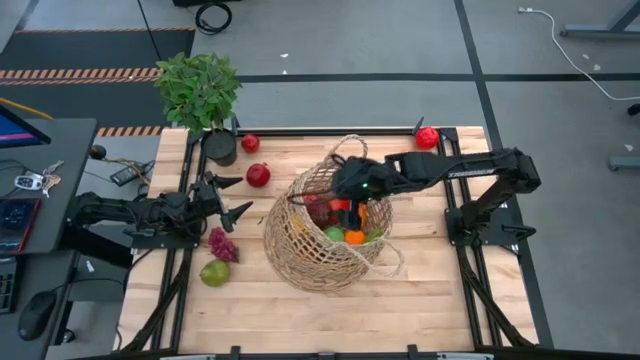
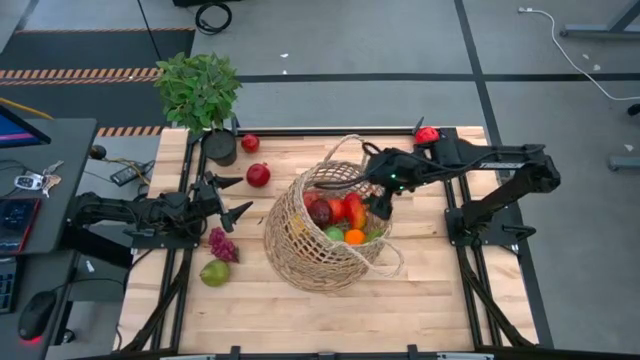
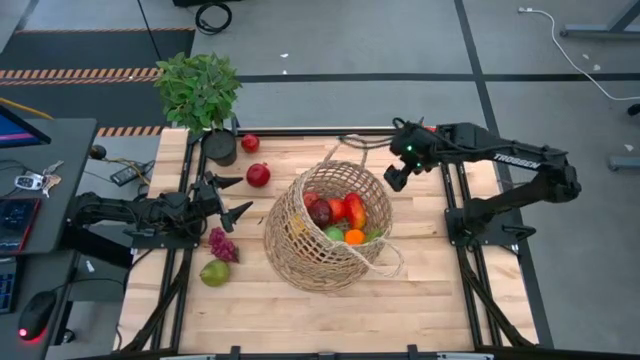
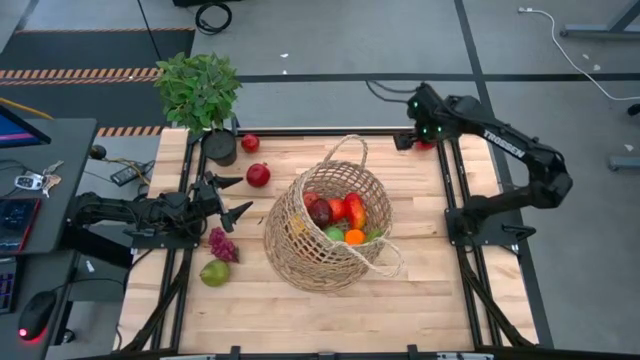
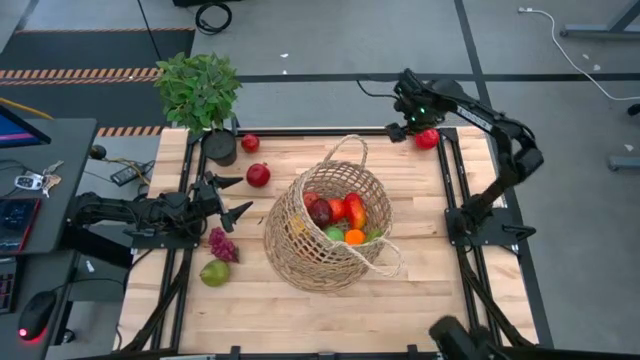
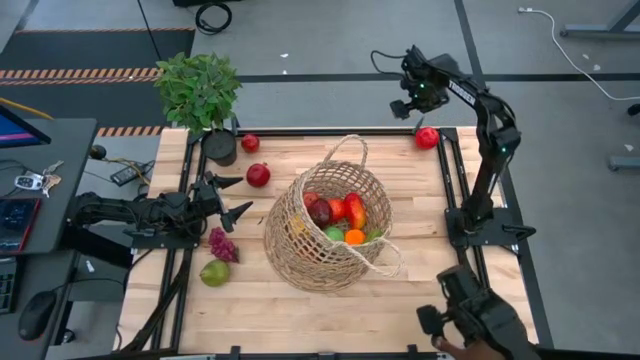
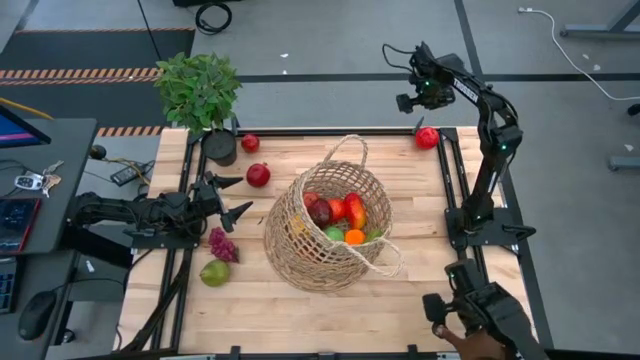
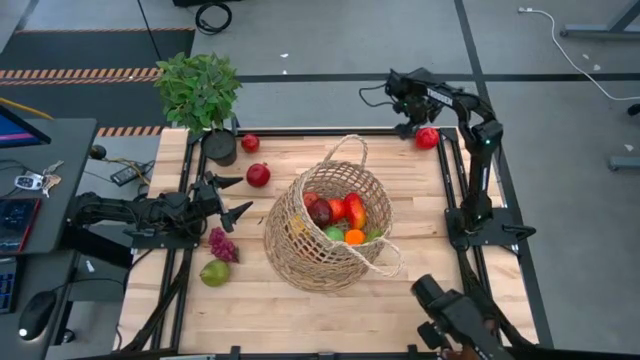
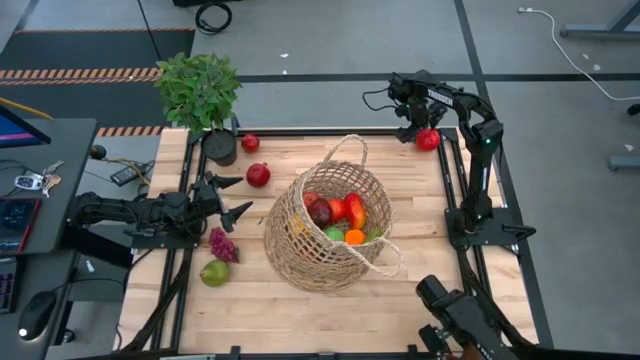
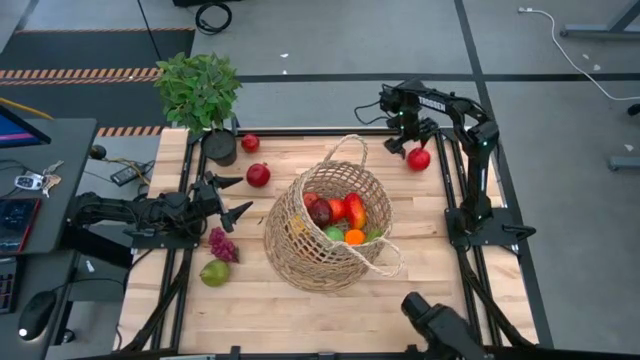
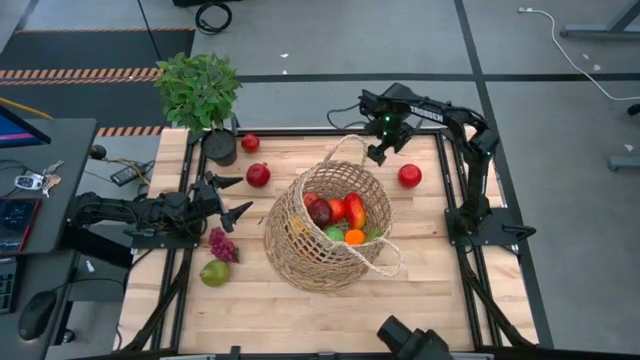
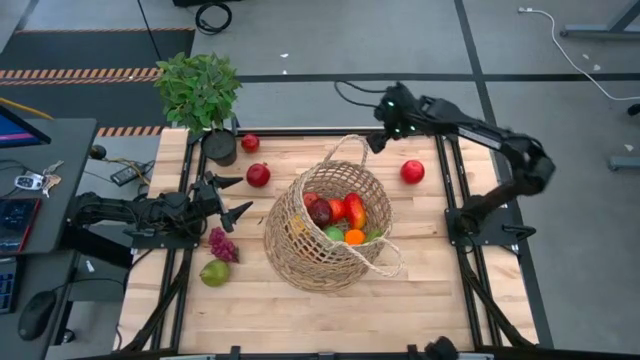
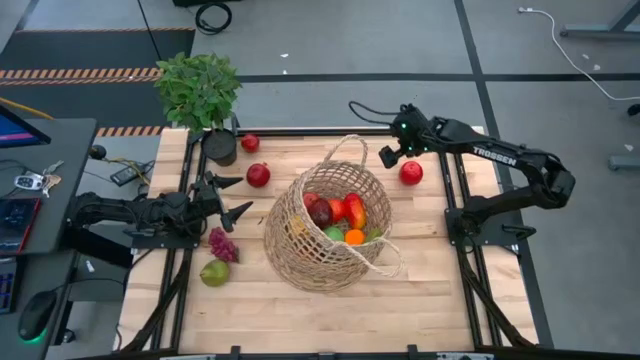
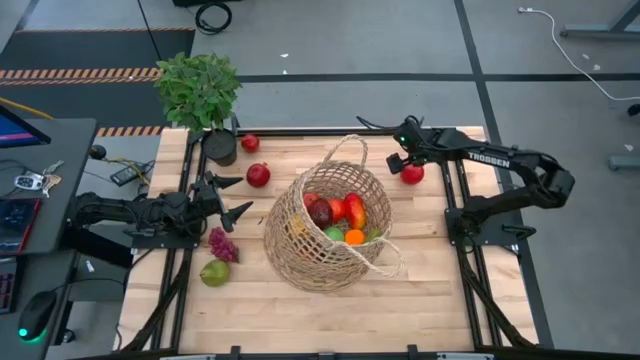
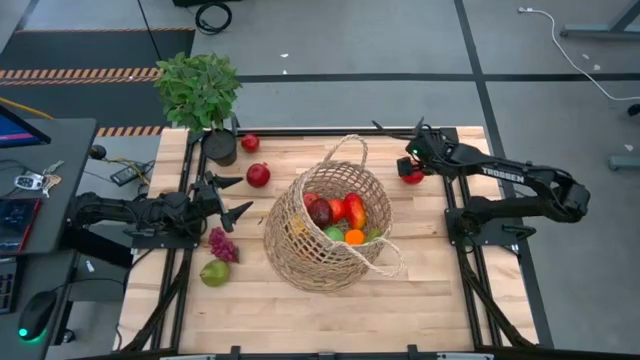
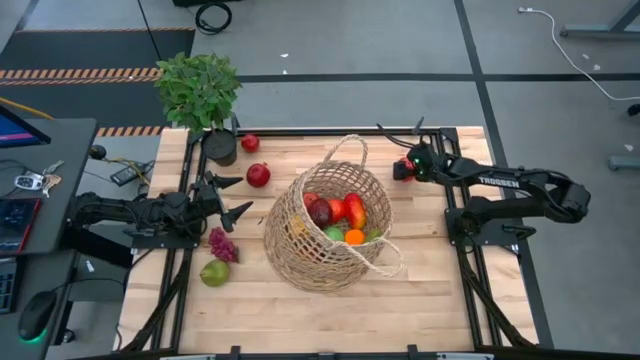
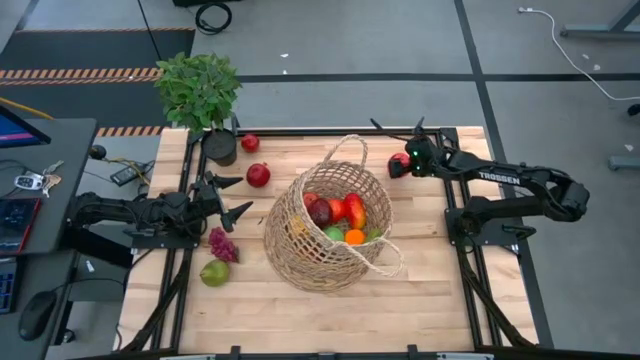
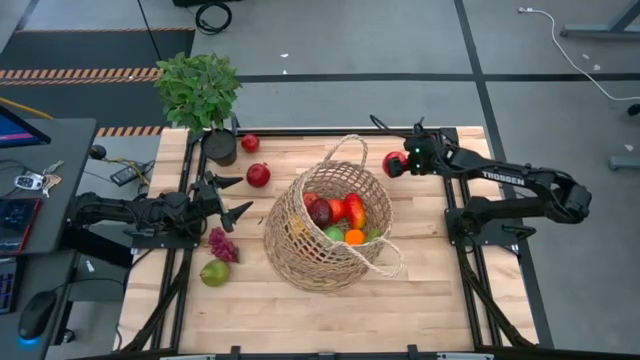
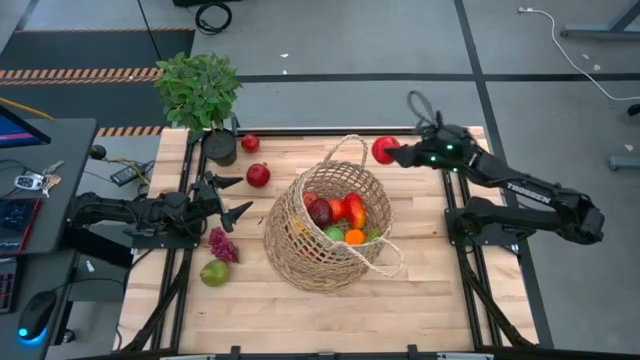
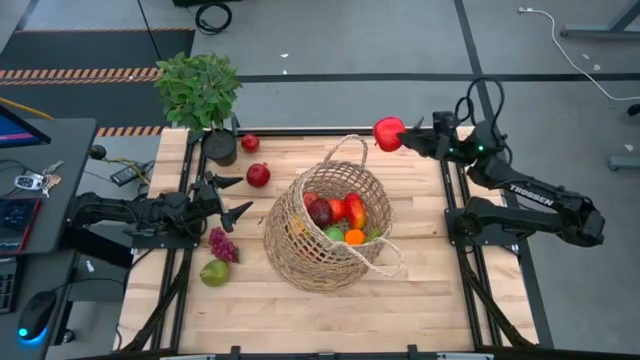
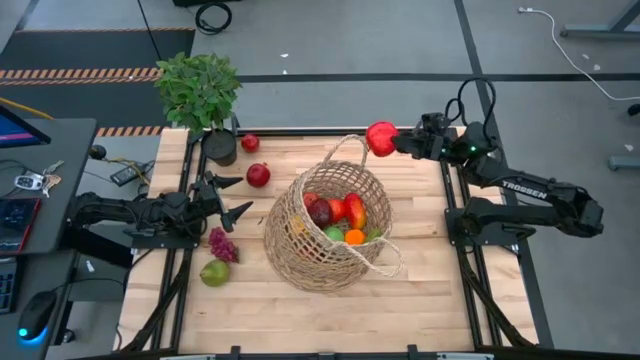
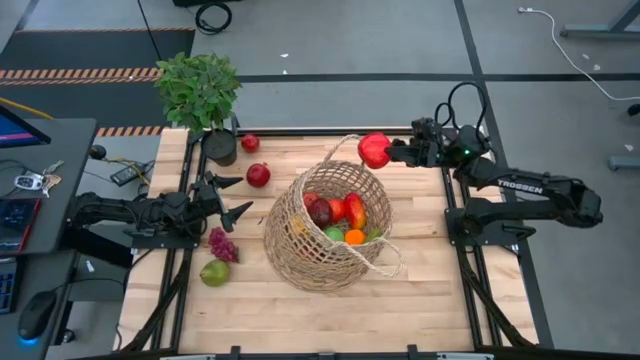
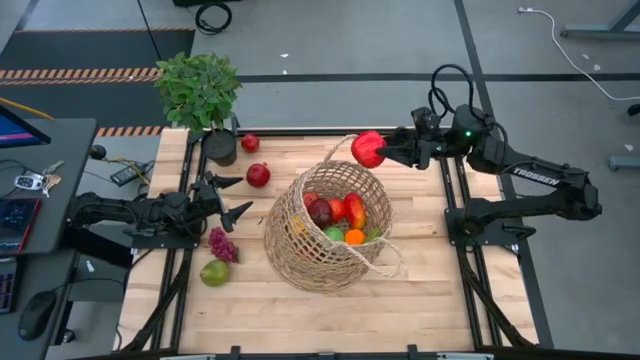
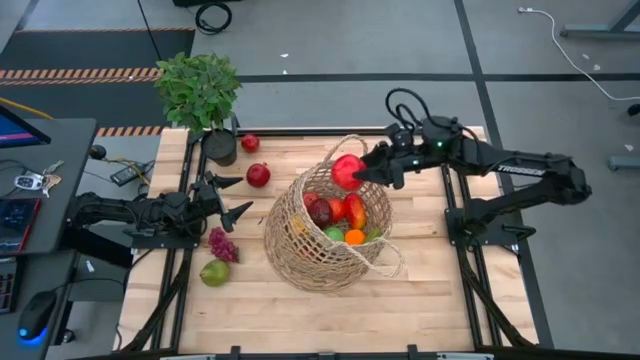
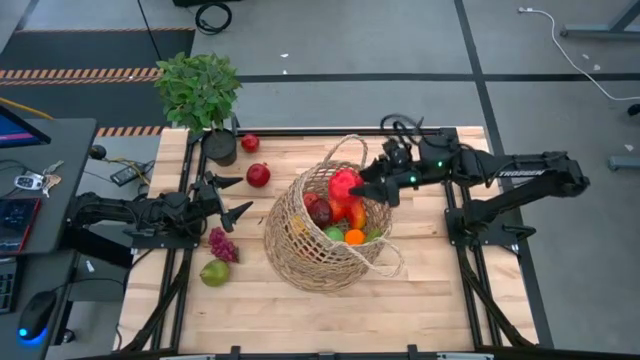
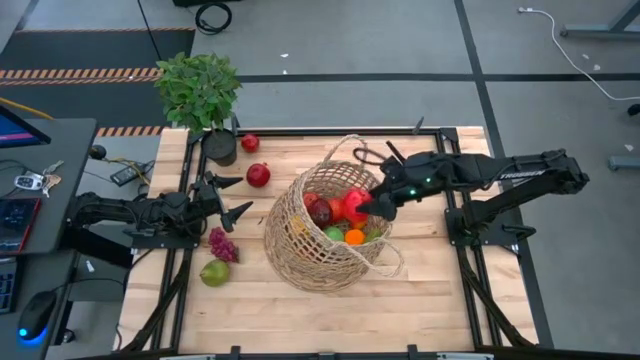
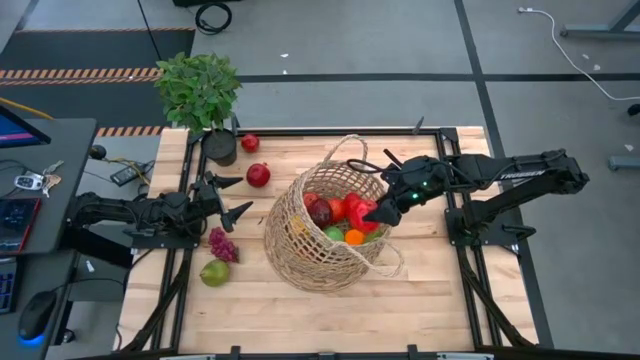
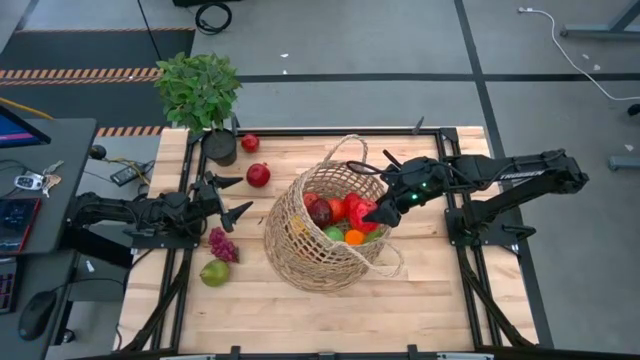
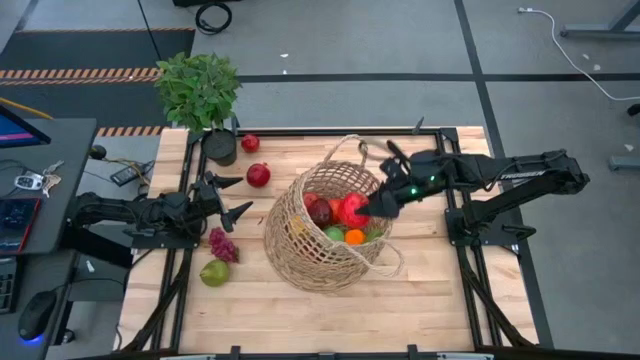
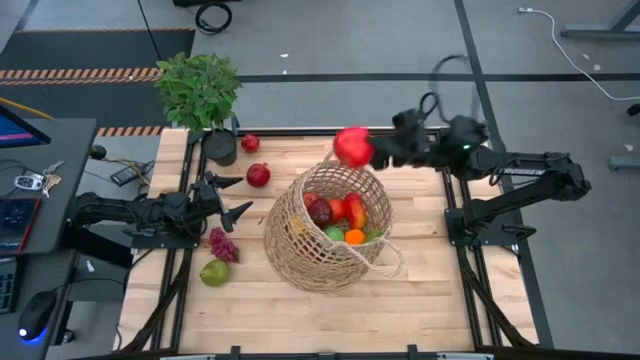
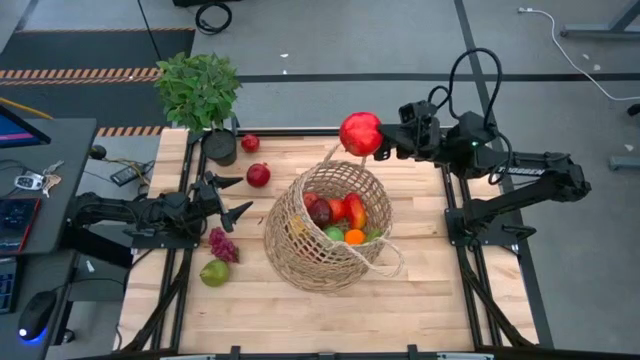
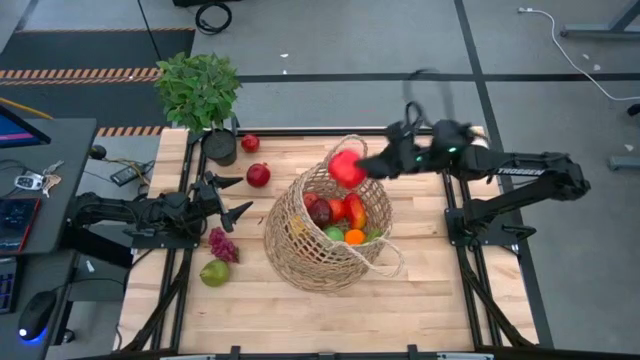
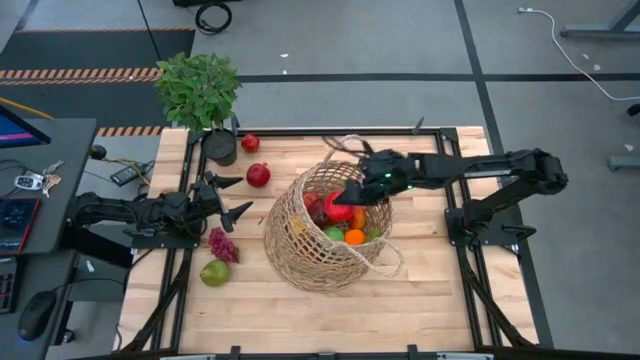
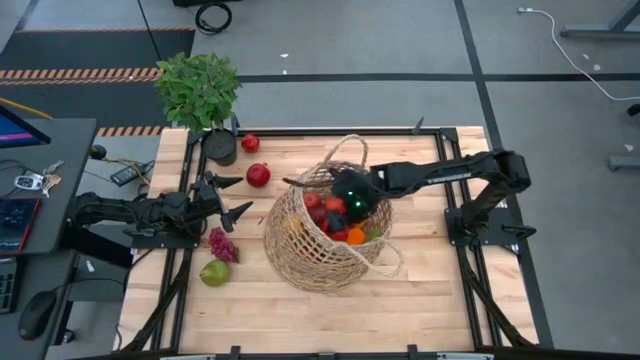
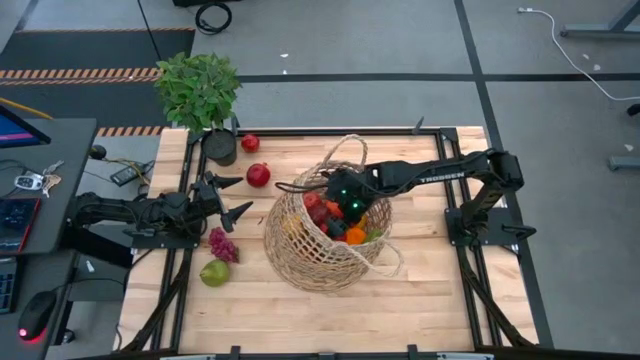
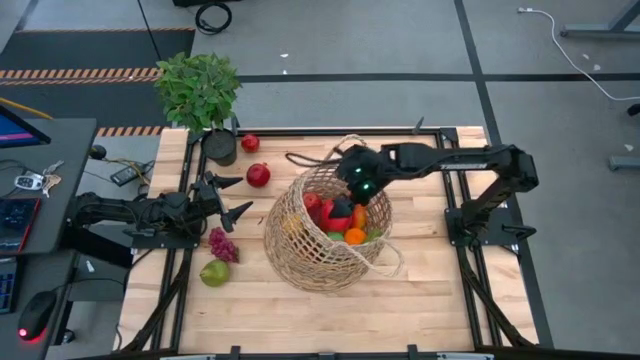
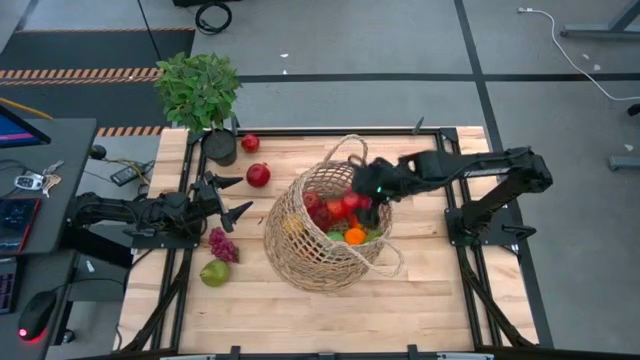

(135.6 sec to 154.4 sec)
Task: Build produce basket
Put the red apple into the brown basket

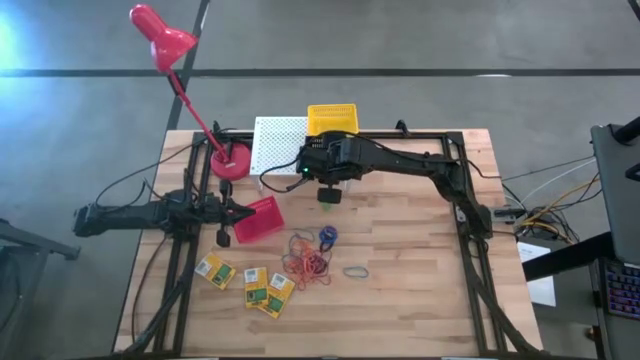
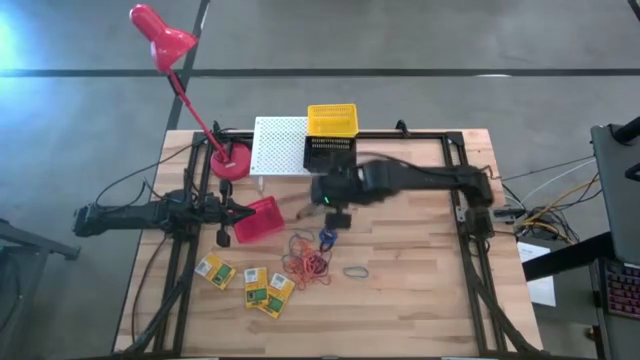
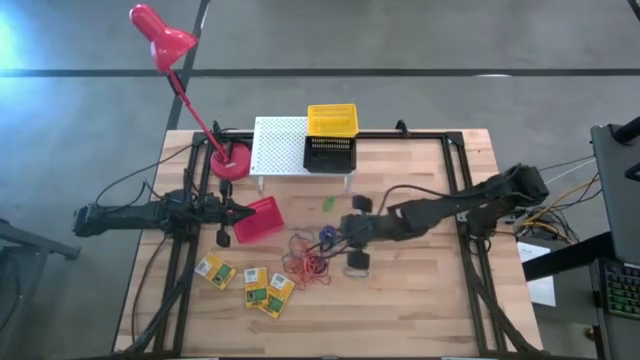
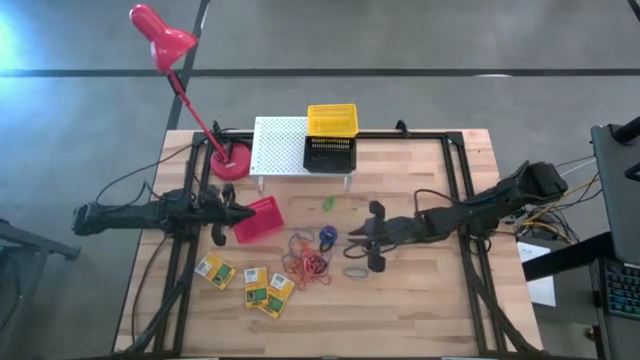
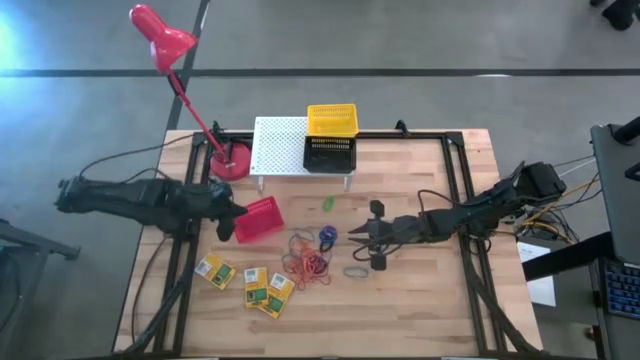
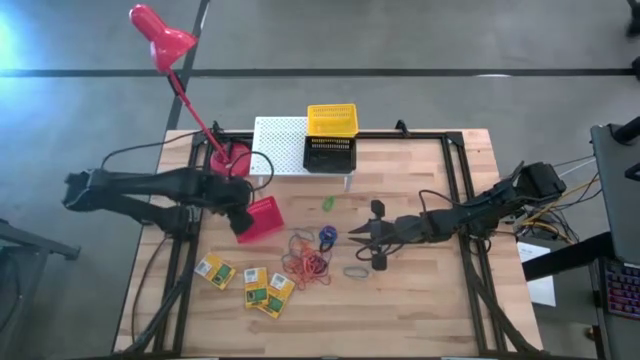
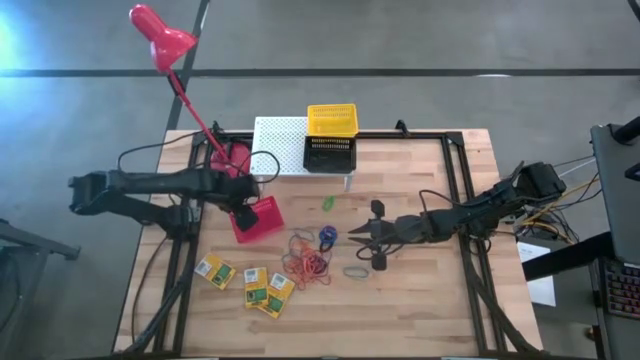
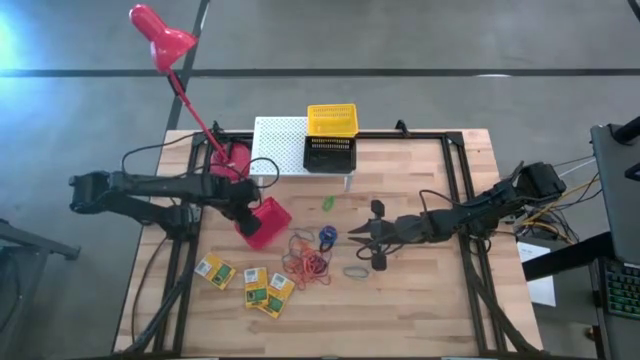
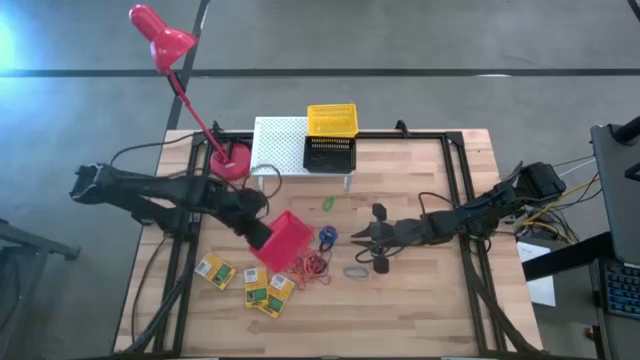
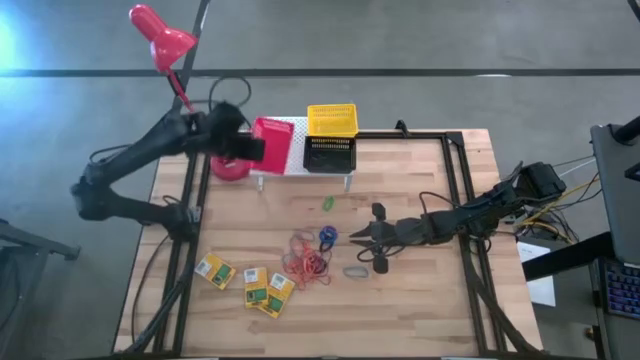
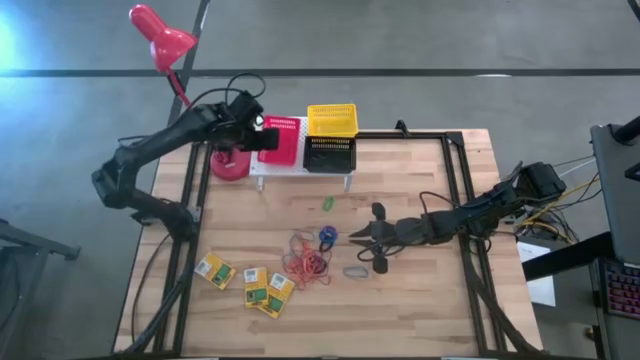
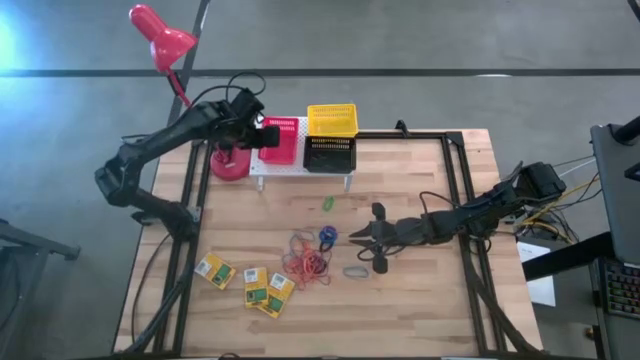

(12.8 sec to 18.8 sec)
Task: Pick & Place Office Desk Supplies
Put the red bin on the shelf
